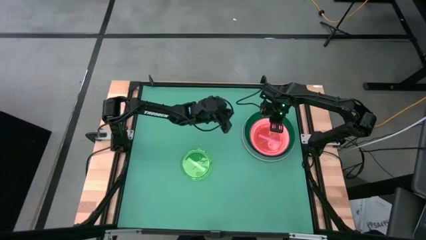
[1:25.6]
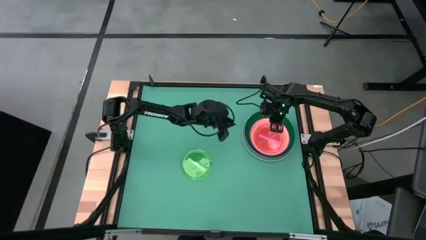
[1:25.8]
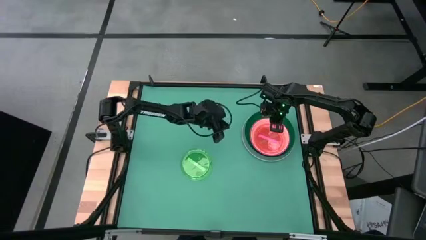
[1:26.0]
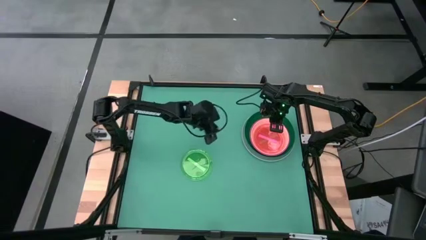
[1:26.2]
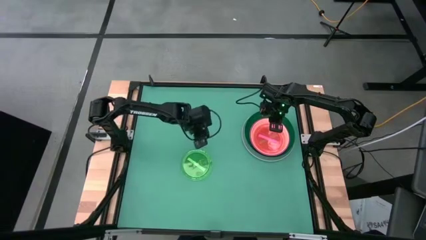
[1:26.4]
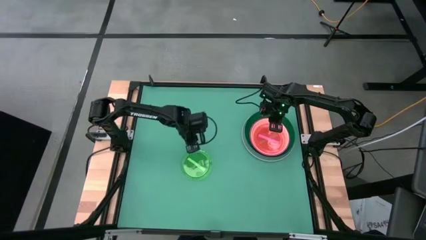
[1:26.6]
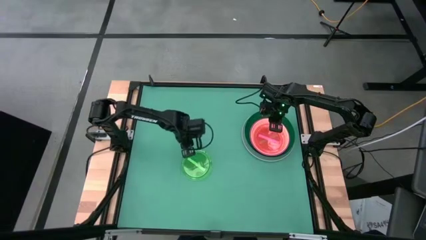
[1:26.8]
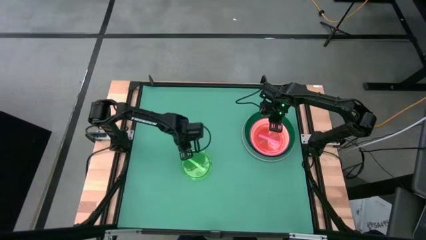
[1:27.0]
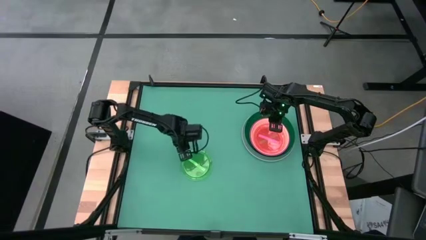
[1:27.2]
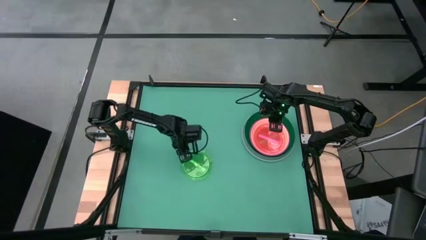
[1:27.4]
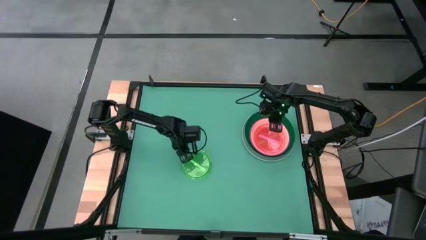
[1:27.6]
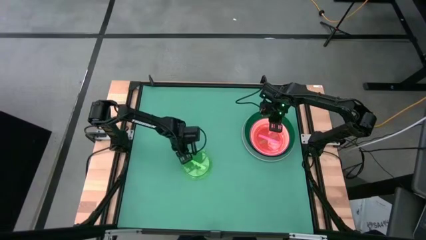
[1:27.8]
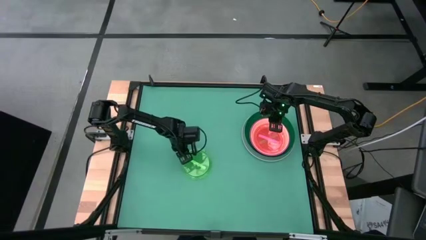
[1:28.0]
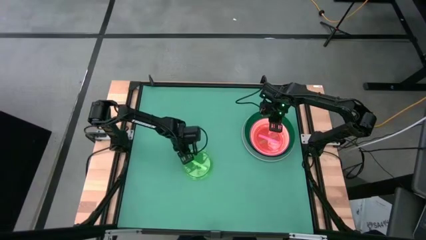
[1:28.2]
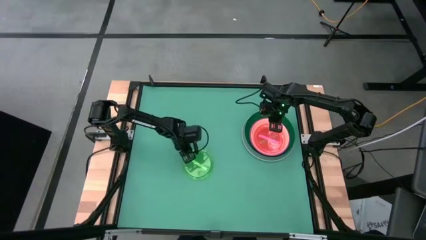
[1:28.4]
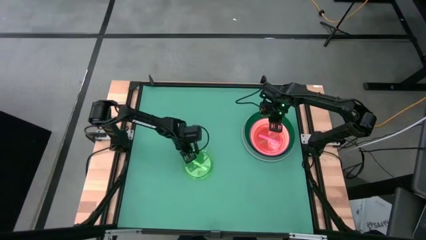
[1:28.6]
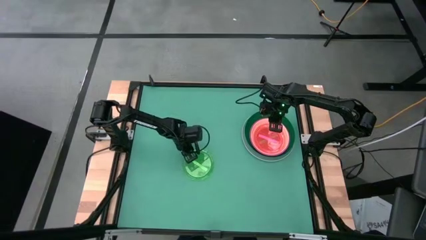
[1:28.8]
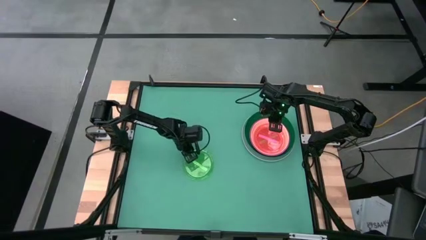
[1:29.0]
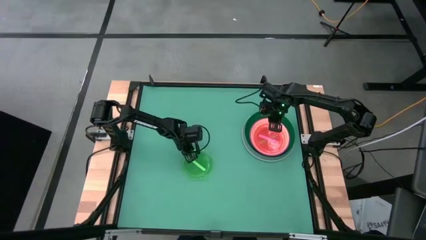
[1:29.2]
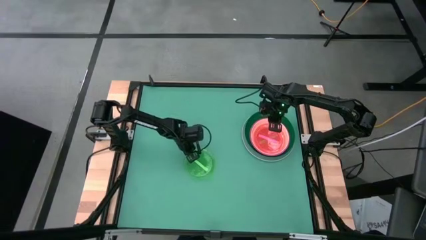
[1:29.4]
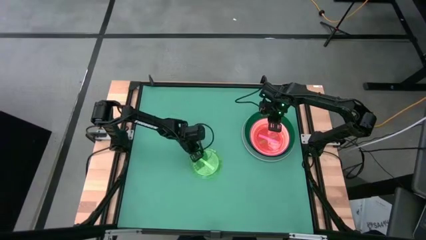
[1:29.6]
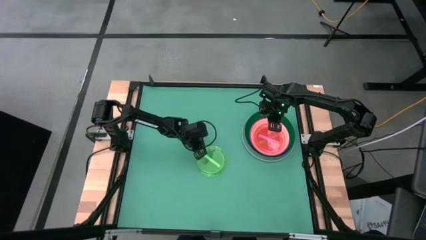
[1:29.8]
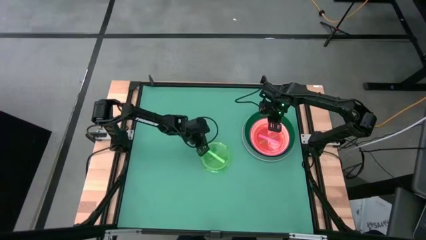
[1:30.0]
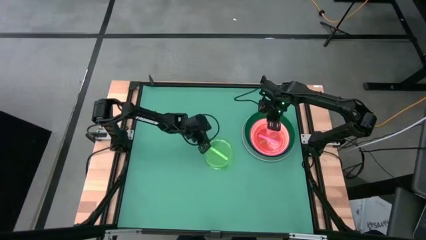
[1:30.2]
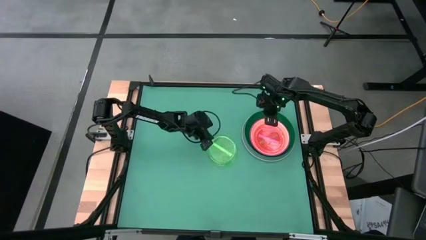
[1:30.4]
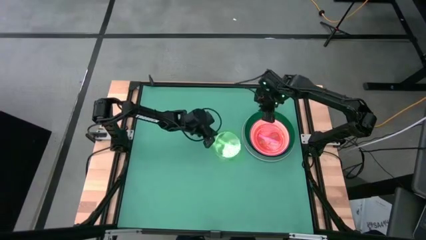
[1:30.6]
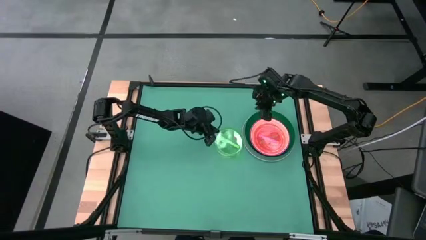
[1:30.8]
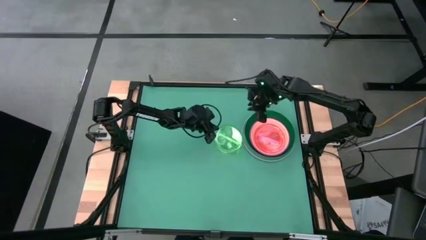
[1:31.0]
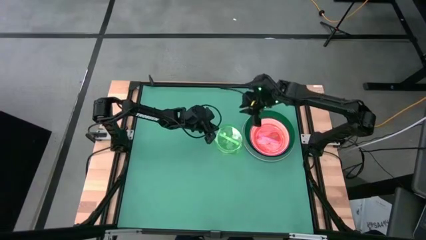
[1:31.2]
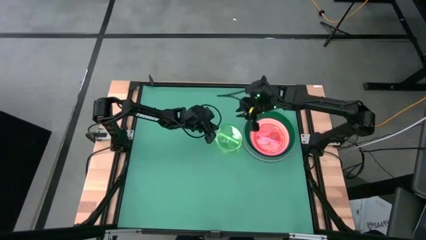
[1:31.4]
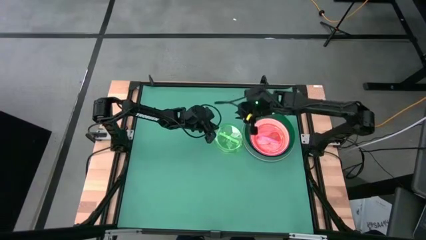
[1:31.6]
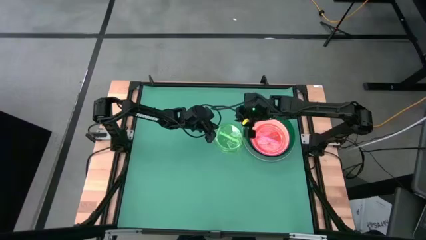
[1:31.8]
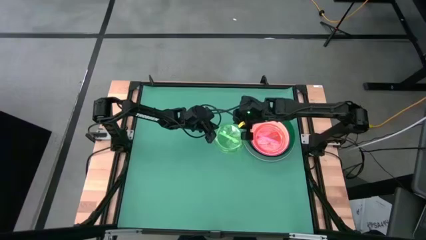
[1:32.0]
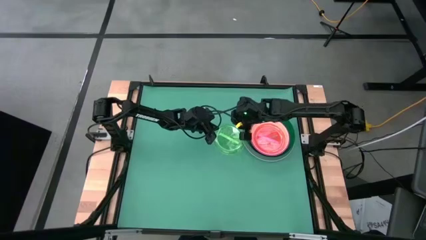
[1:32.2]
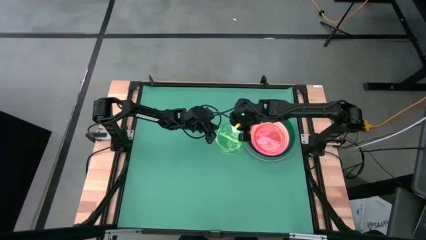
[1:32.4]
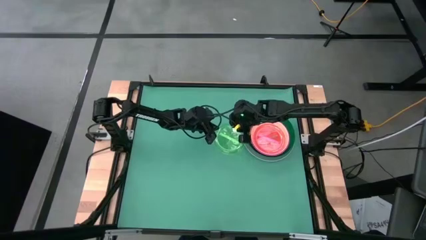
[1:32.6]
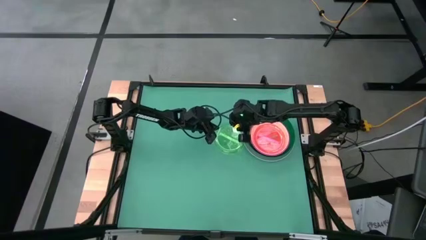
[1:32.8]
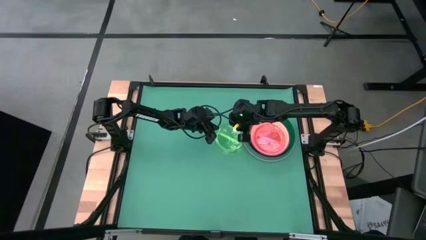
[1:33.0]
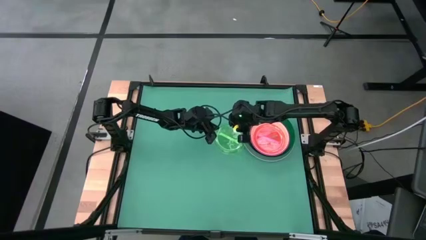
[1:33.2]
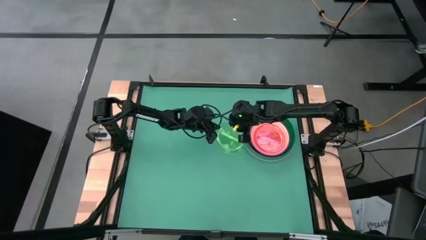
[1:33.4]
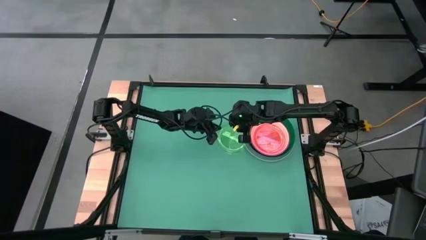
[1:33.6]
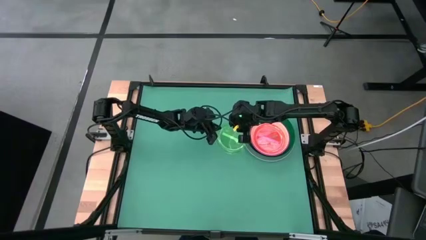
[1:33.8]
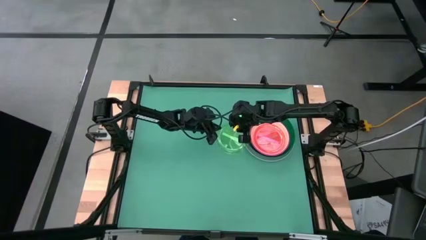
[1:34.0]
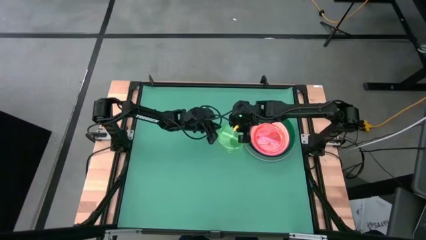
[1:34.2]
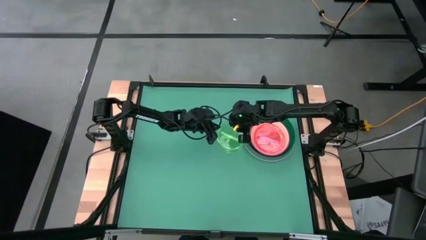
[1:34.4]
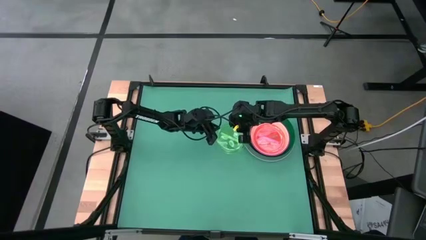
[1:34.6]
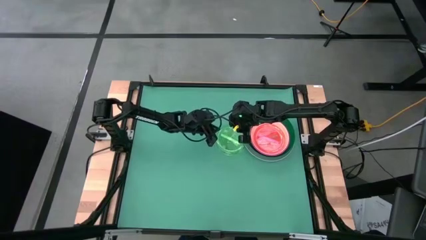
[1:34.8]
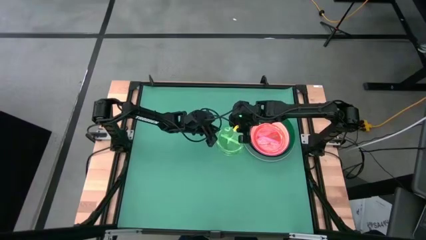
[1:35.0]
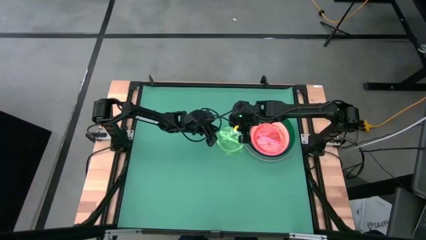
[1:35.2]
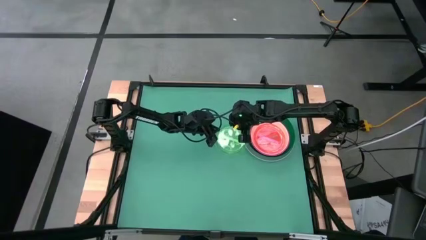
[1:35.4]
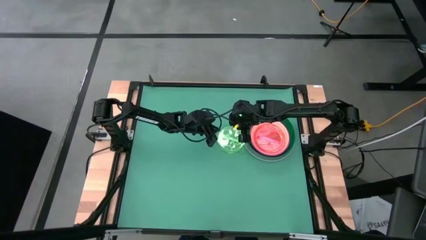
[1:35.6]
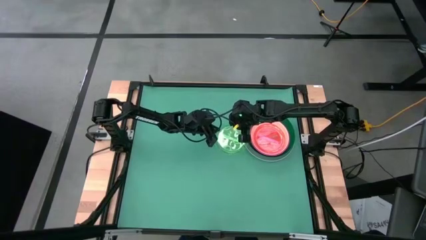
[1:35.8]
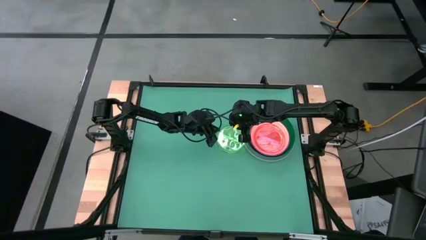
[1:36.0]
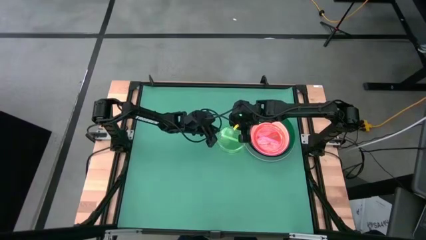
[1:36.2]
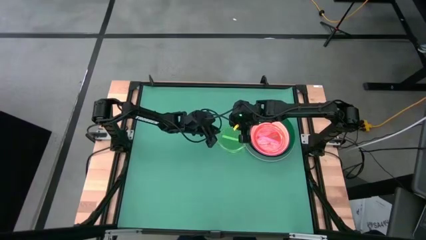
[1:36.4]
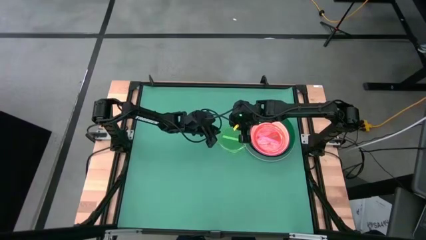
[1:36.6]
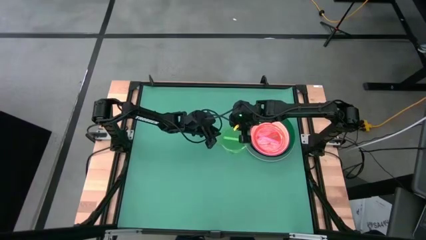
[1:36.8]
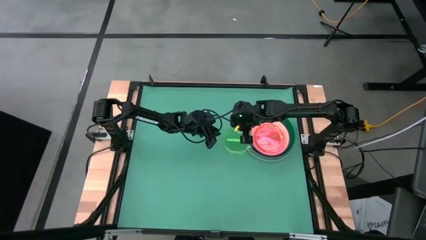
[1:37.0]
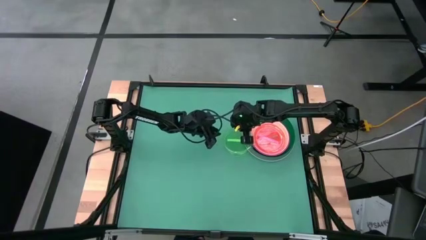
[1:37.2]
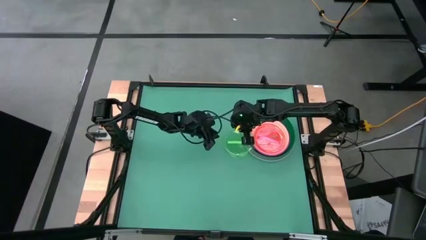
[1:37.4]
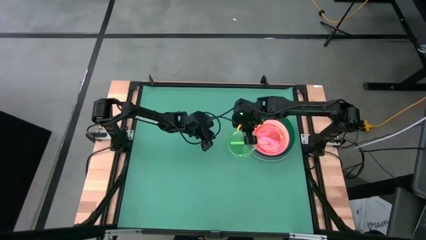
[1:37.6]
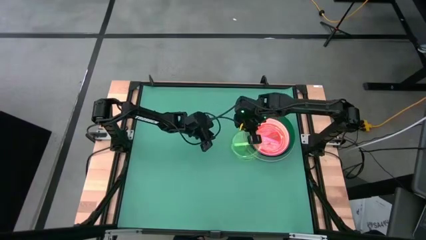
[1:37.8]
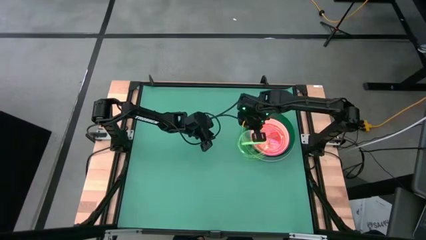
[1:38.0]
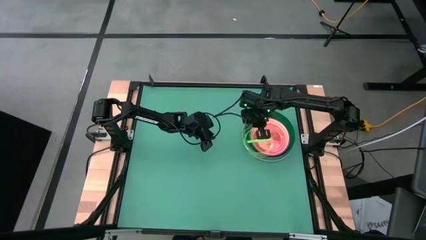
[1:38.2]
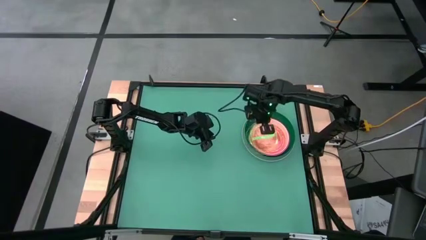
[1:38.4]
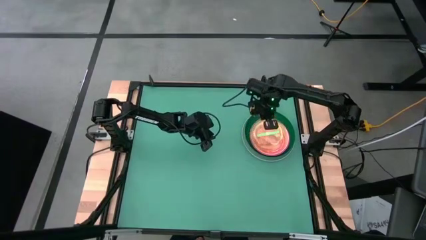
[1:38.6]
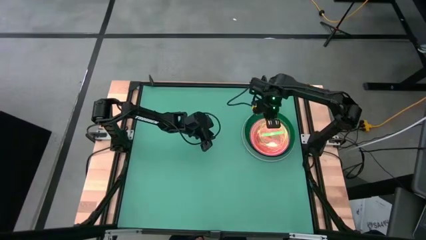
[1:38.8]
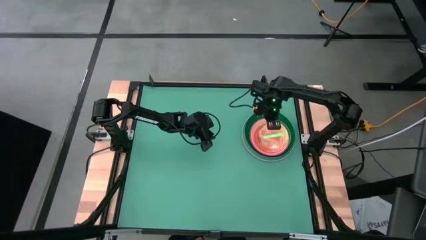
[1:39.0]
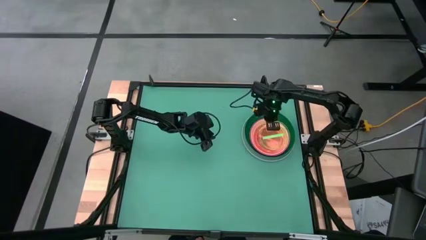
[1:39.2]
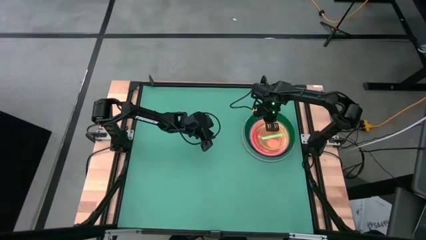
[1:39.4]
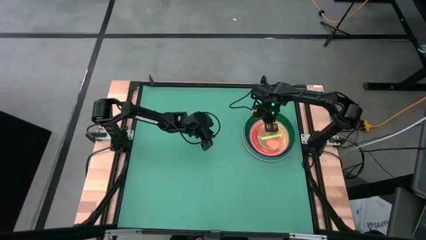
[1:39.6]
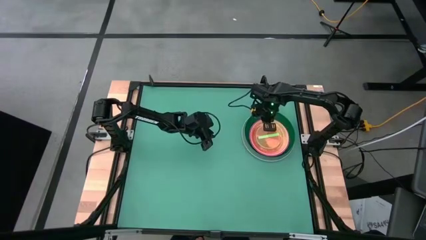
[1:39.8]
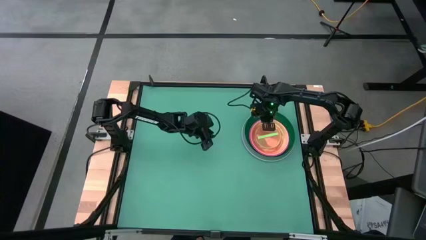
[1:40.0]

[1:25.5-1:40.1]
Task: Stack plastic plates
Stack the light green plate on top of the light pink plate
